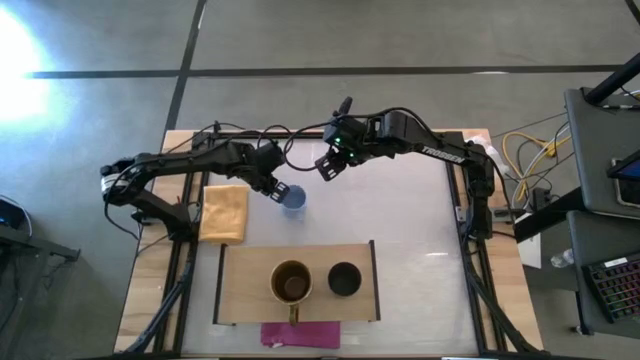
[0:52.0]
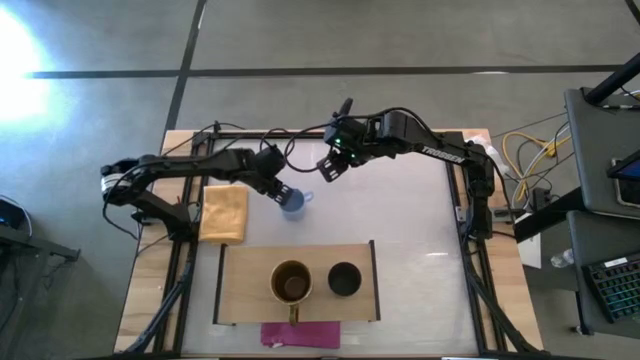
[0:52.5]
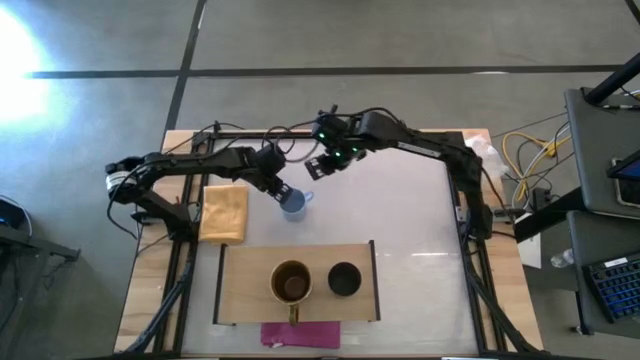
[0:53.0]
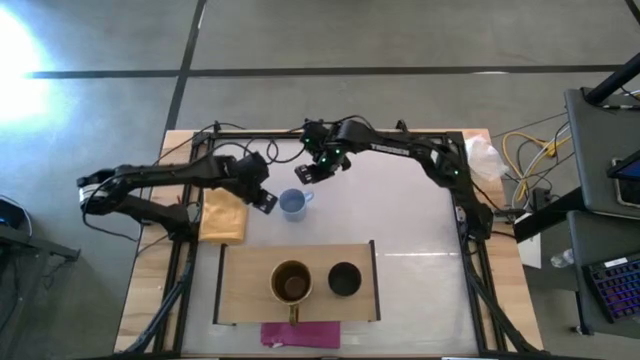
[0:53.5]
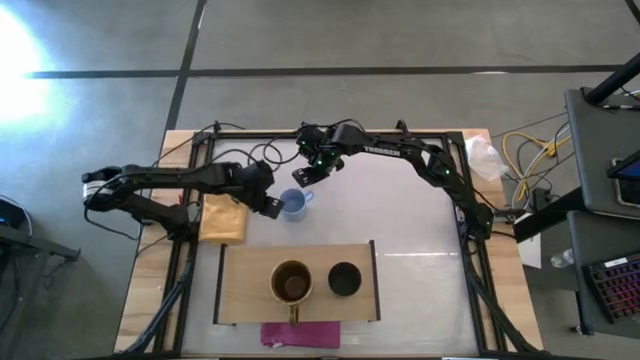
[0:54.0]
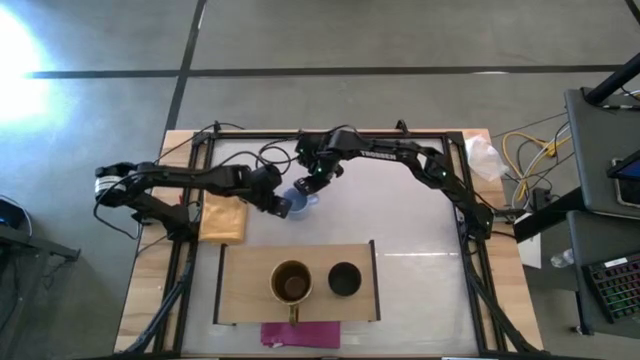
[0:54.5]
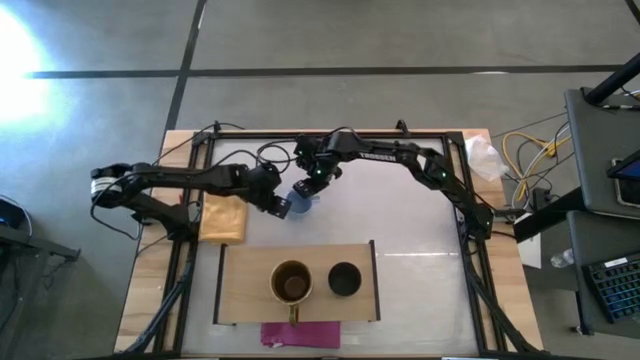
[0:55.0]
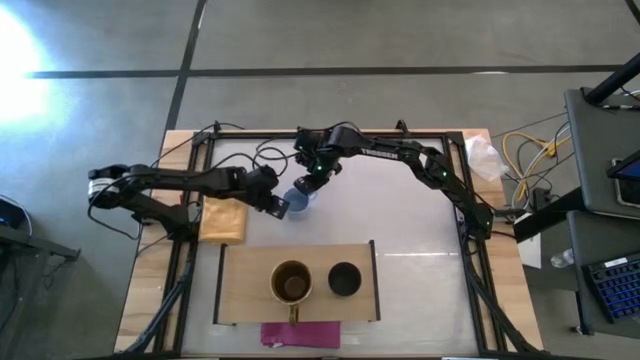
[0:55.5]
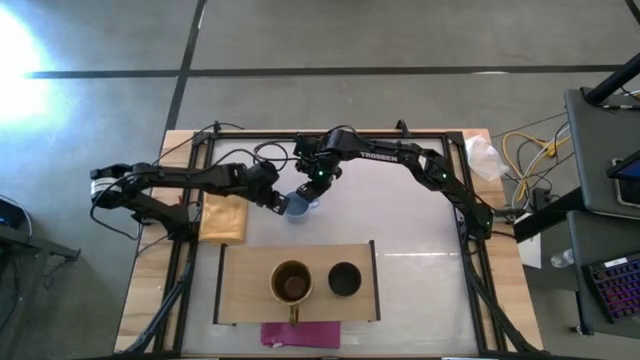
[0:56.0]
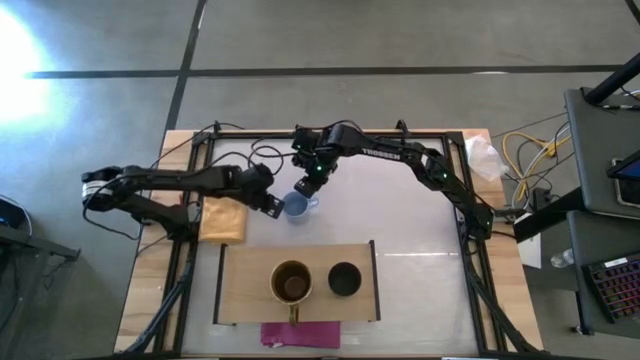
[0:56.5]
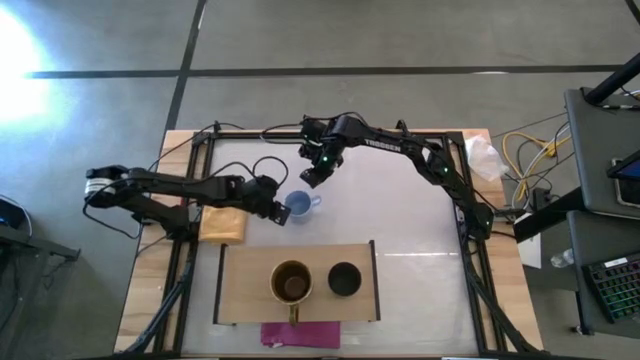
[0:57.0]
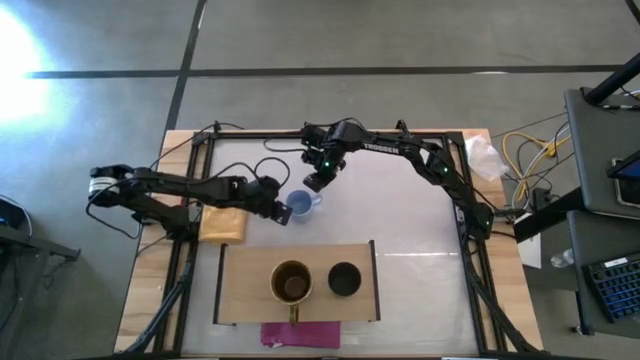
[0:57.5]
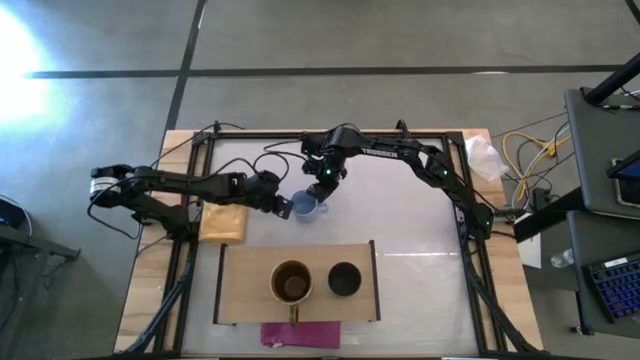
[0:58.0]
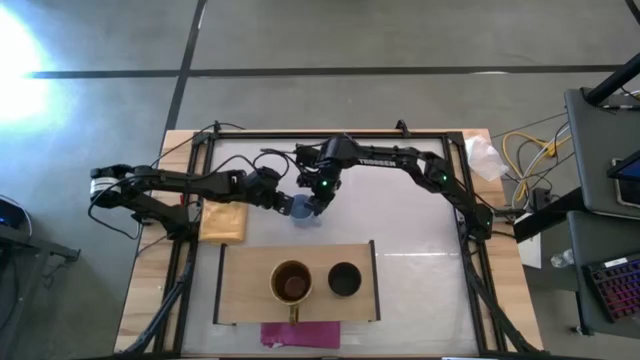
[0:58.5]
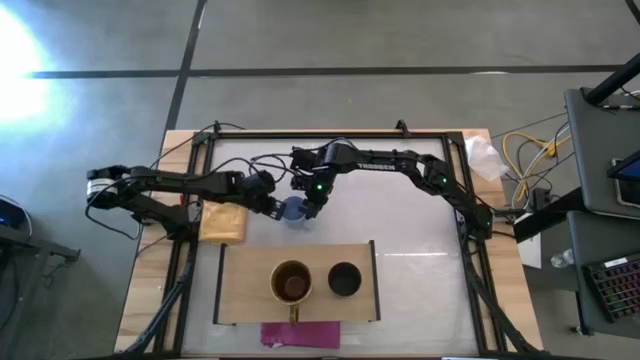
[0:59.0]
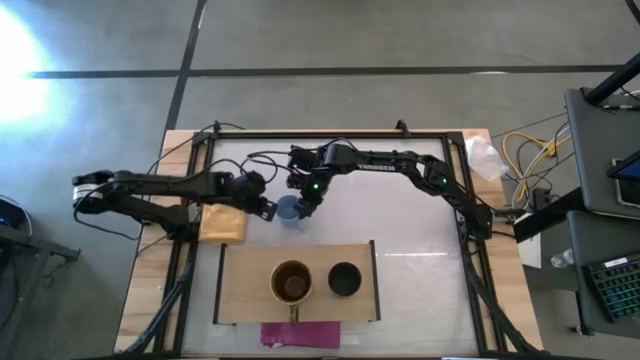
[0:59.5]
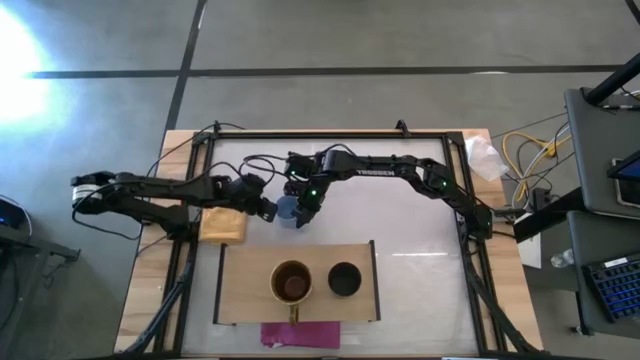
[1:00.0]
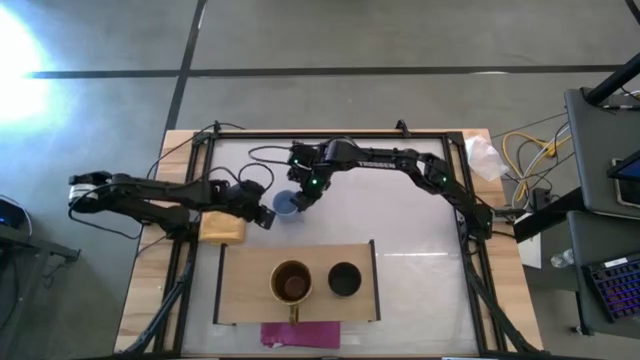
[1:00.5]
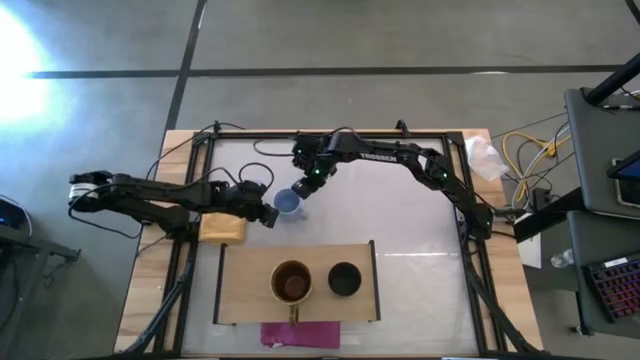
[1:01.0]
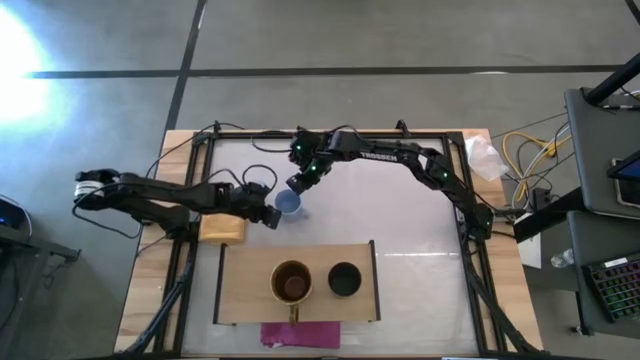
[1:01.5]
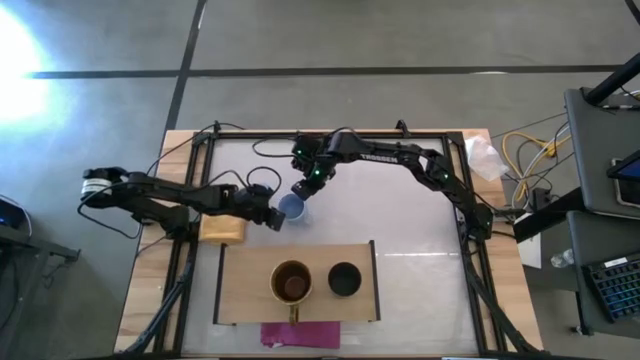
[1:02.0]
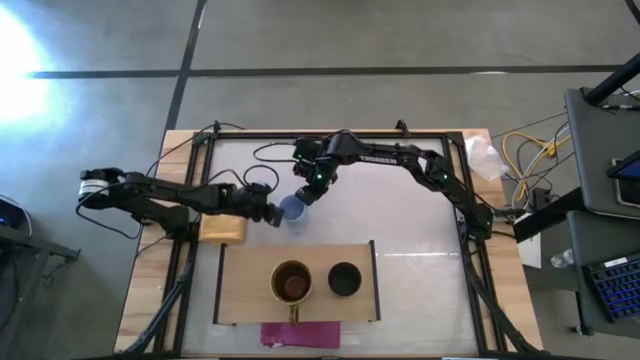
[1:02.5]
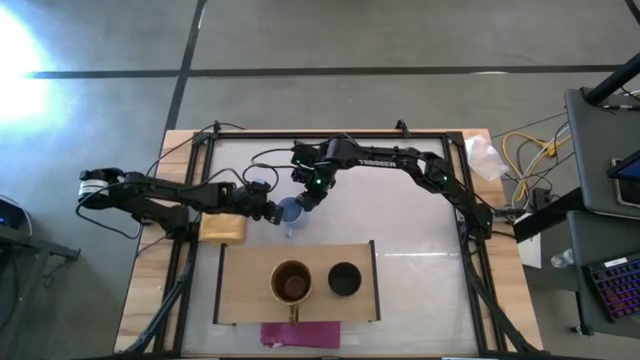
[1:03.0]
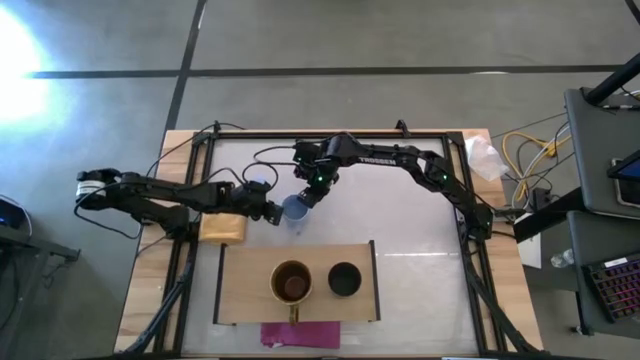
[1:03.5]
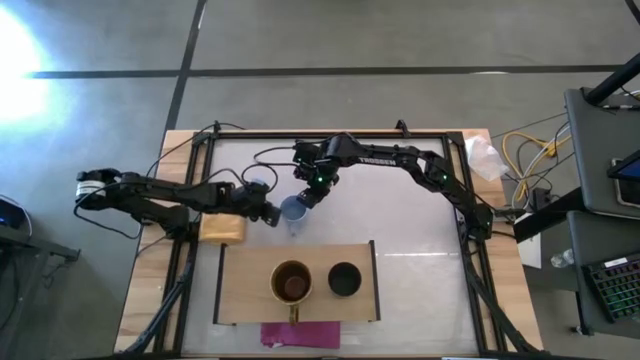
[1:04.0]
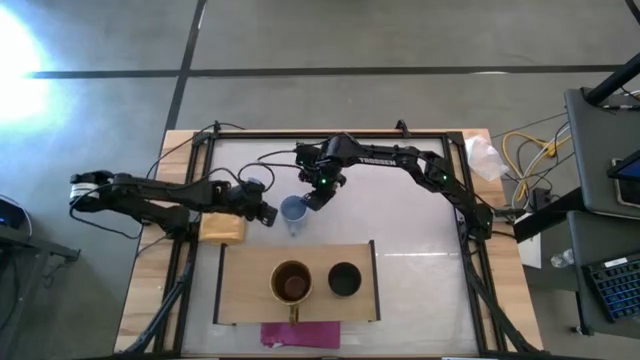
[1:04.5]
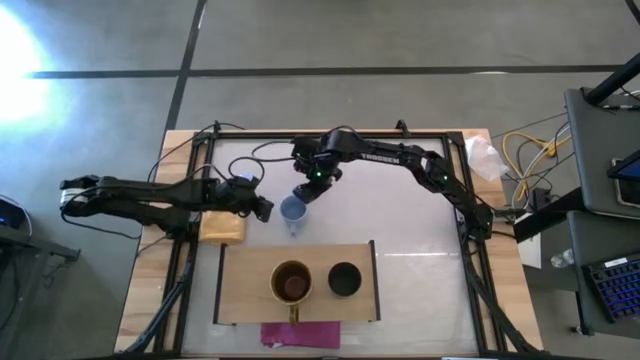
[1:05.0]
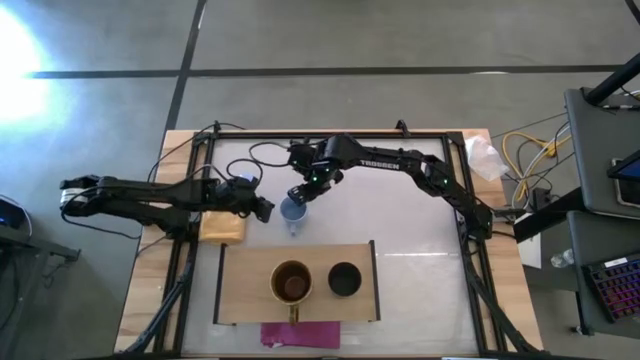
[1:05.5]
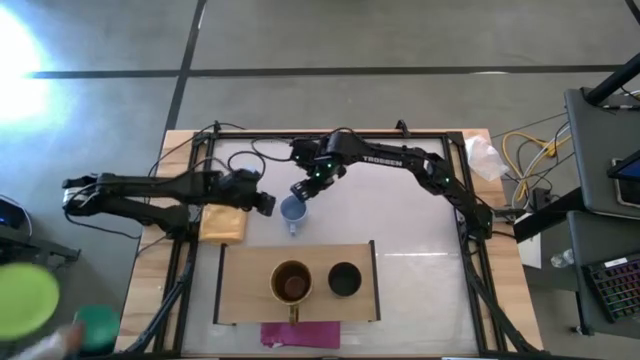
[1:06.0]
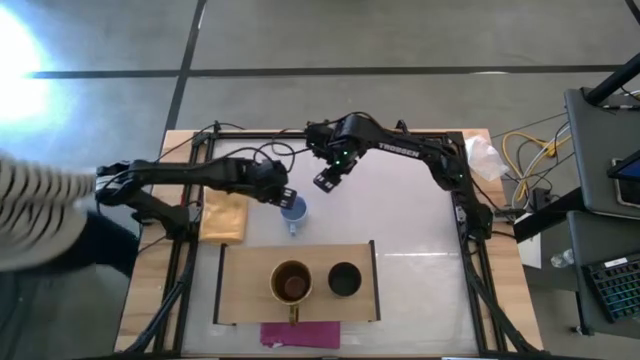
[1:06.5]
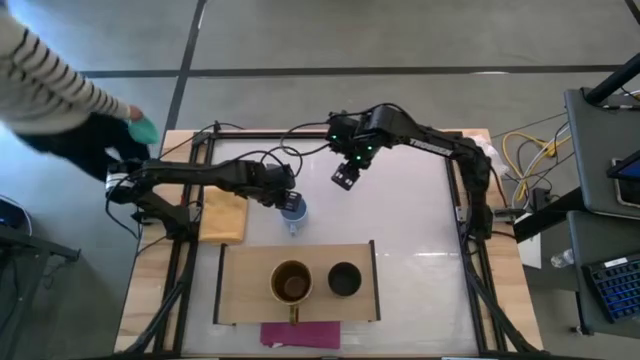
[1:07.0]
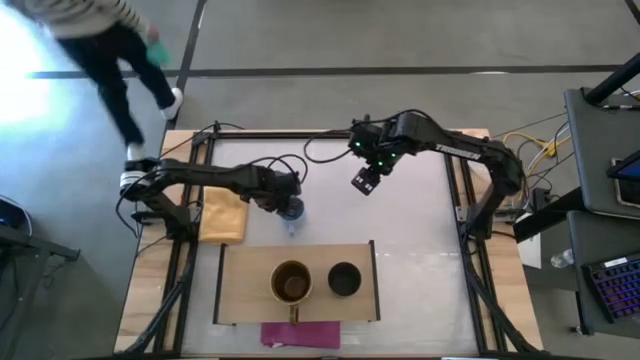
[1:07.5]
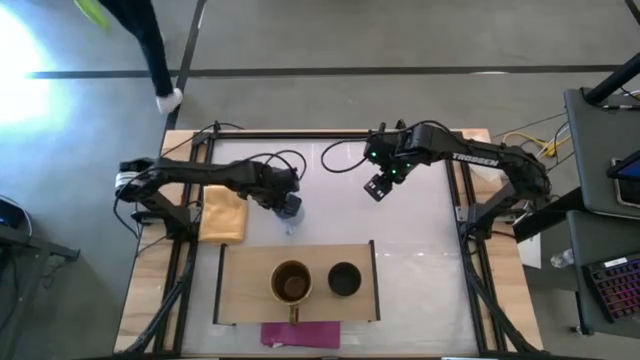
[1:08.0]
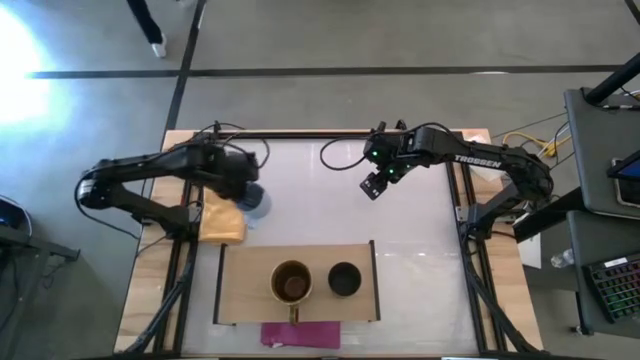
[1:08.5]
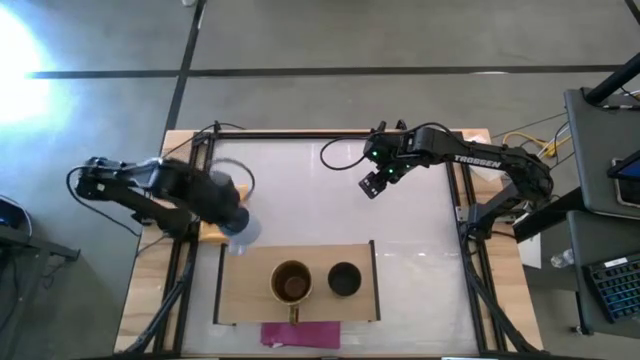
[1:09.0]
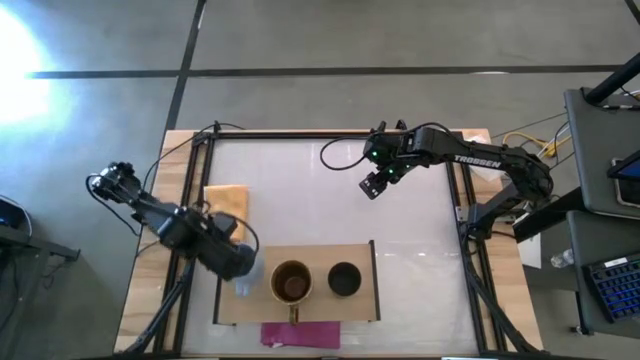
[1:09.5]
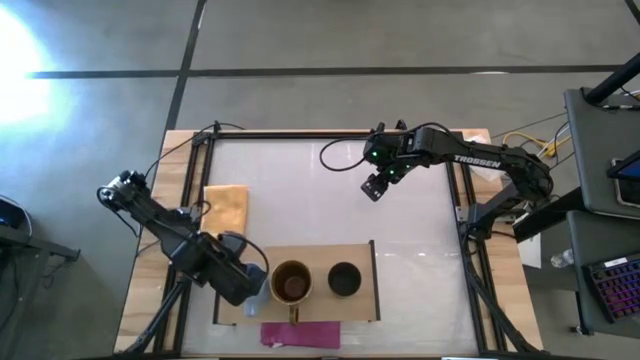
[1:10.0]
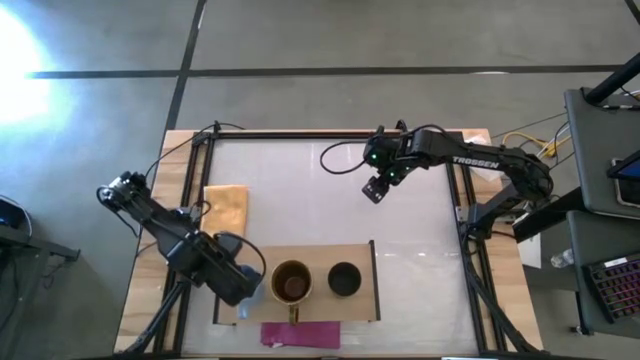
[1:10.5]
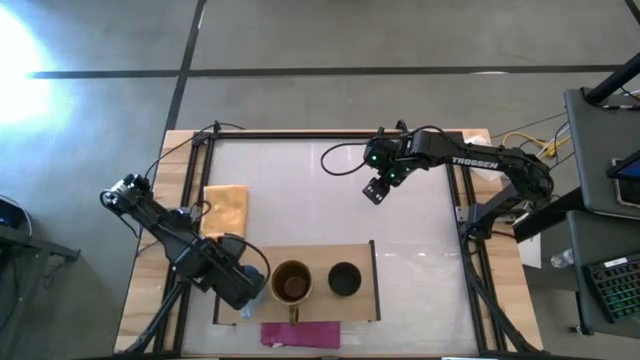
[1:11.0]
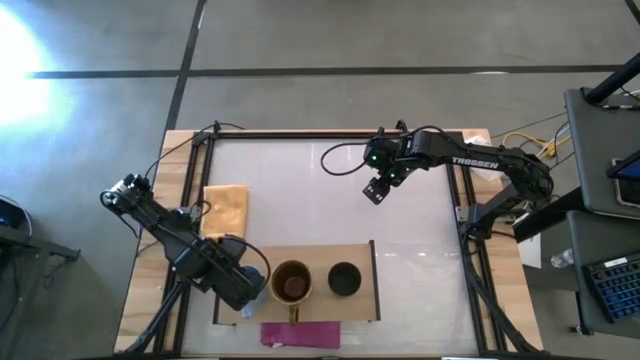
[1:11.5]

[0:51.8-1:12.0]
Task: Stack small to large cups/mugs on shelf
Put the light blue mug on the shelf

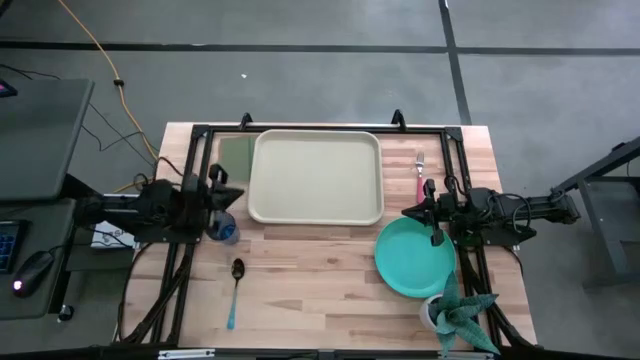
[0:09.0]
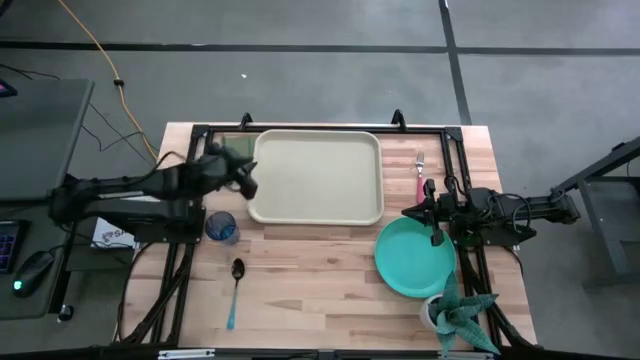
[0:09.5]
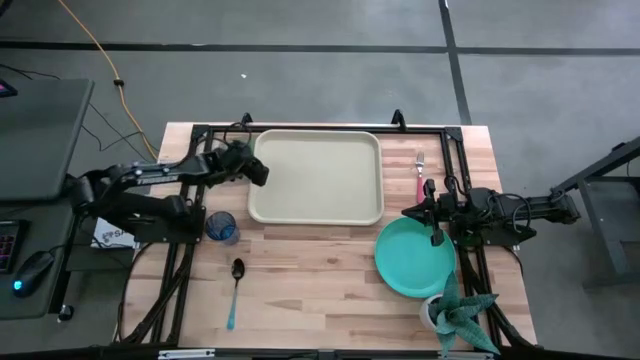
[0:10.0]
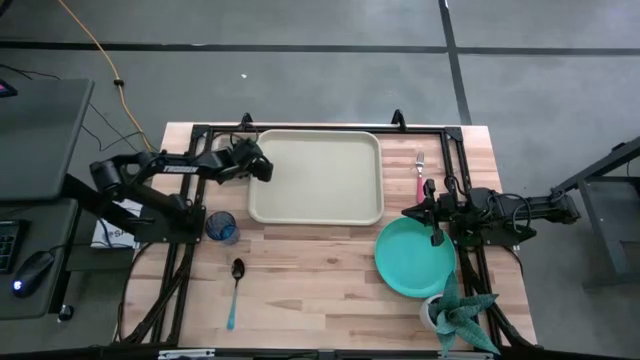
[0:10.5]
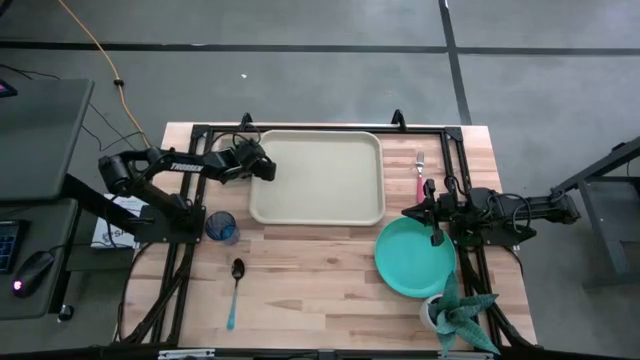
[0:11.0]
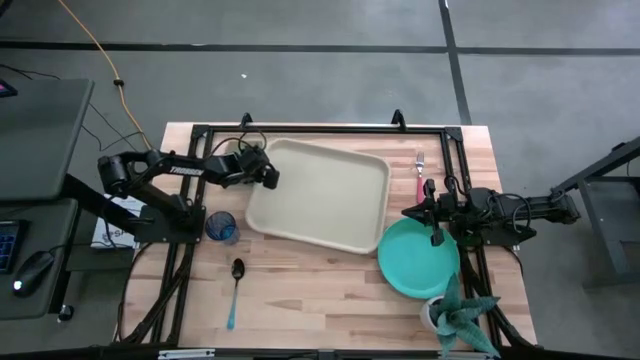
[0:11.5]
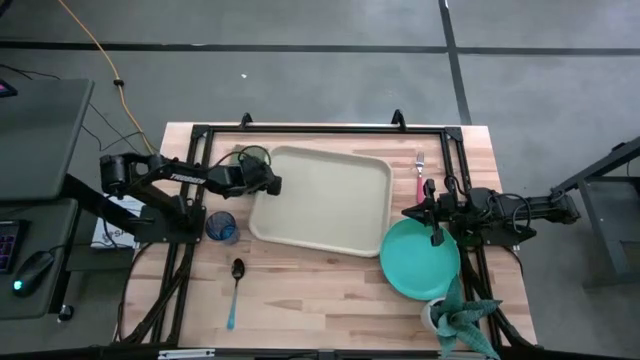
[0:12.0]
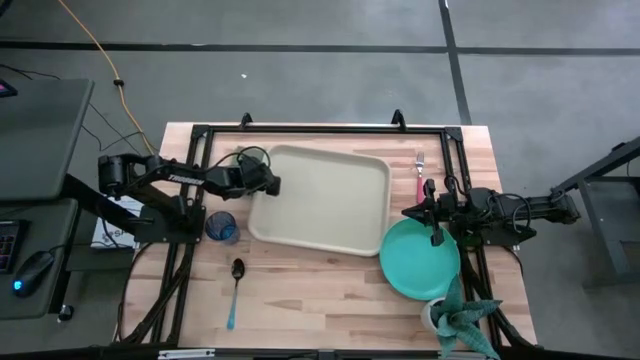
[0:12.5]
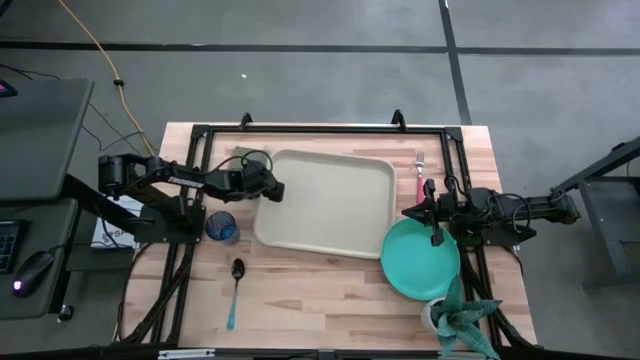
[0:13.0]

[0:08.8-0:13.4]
Task: Pick and place plate/cup/fork/spoon on tray
Prepare the gray tray
